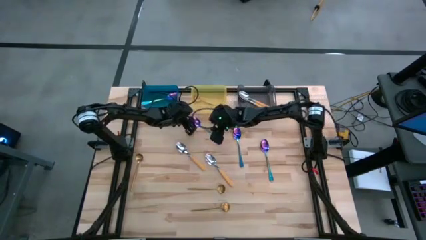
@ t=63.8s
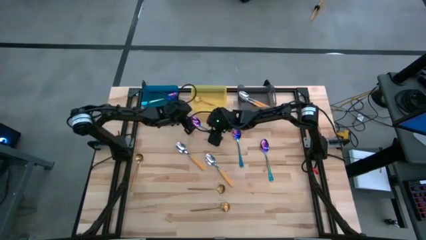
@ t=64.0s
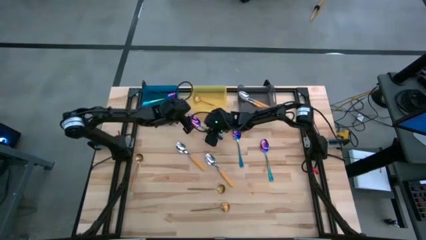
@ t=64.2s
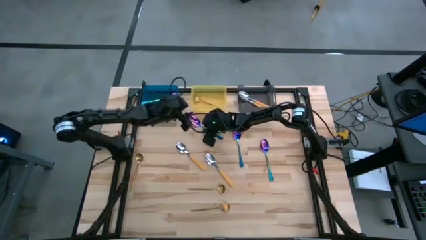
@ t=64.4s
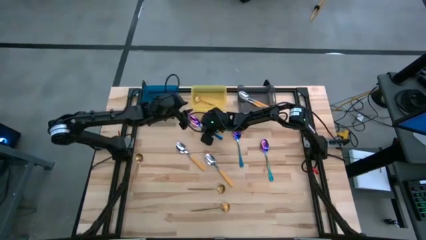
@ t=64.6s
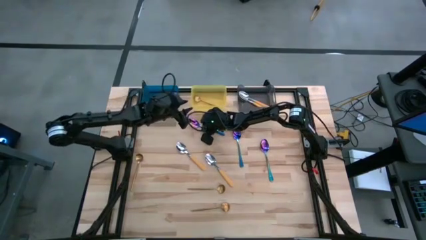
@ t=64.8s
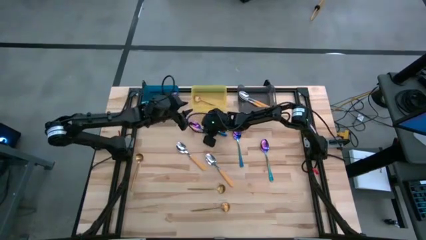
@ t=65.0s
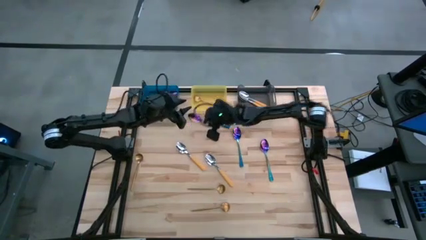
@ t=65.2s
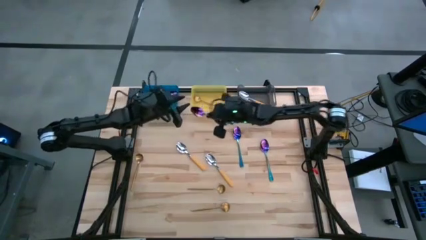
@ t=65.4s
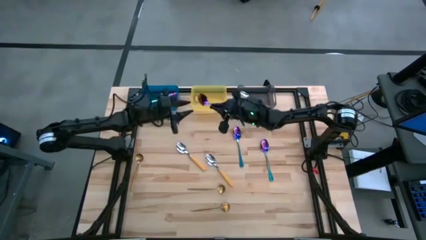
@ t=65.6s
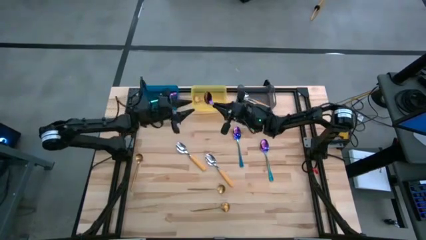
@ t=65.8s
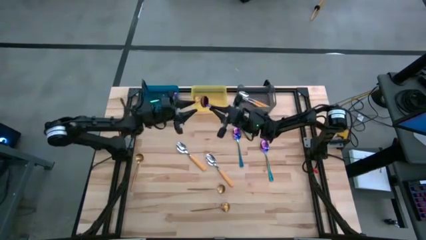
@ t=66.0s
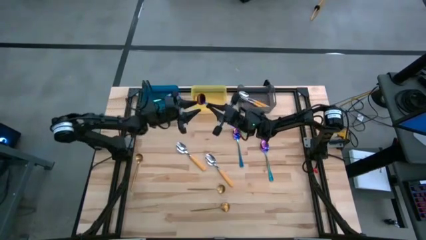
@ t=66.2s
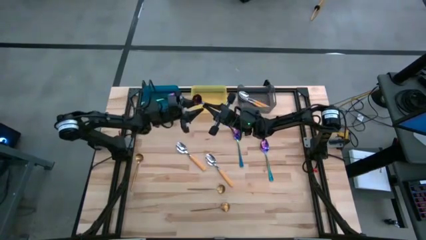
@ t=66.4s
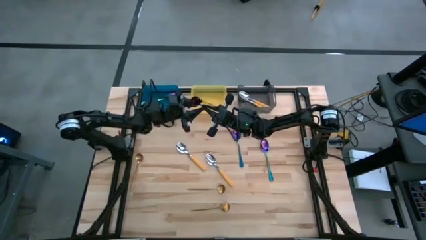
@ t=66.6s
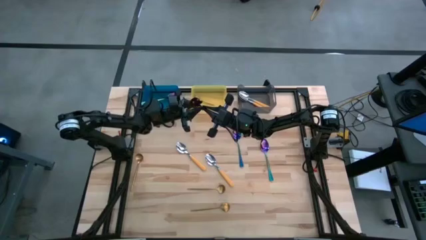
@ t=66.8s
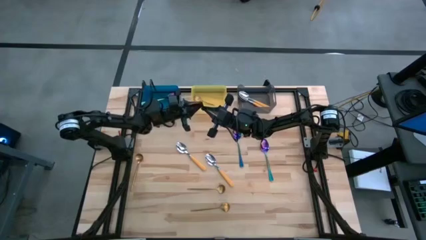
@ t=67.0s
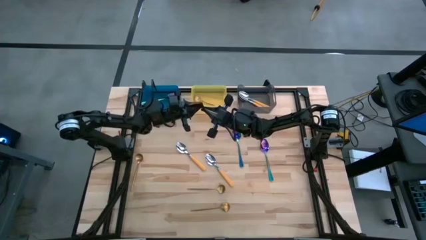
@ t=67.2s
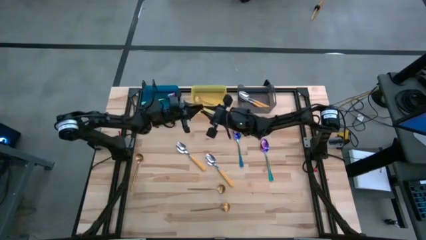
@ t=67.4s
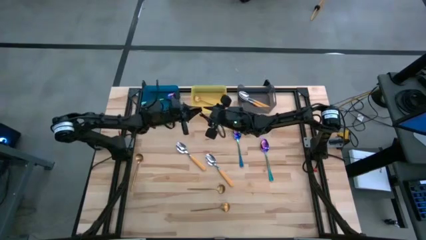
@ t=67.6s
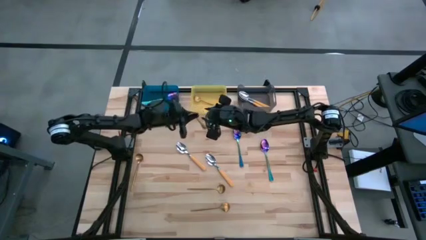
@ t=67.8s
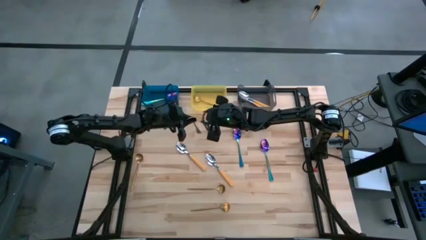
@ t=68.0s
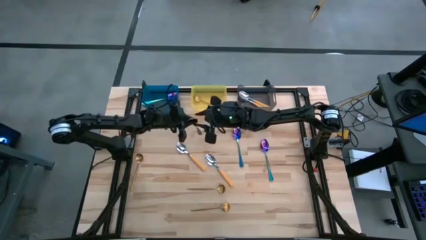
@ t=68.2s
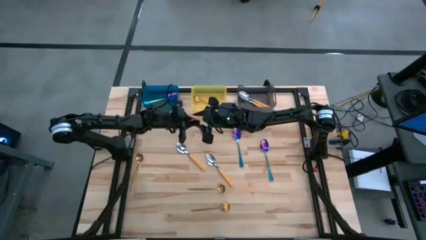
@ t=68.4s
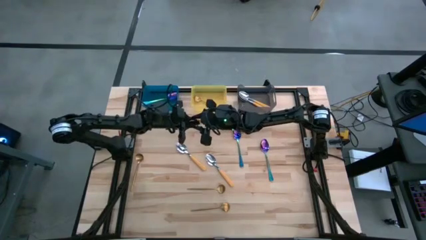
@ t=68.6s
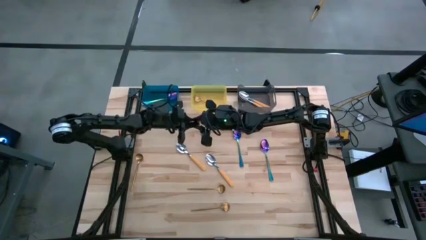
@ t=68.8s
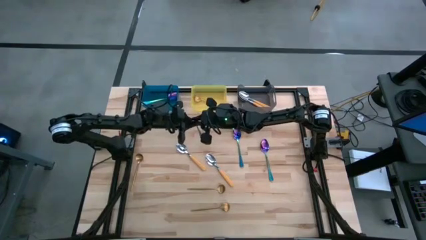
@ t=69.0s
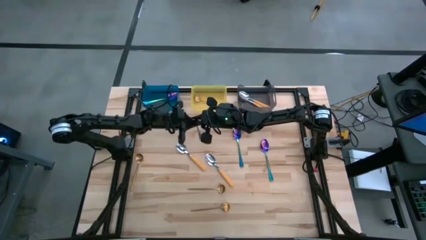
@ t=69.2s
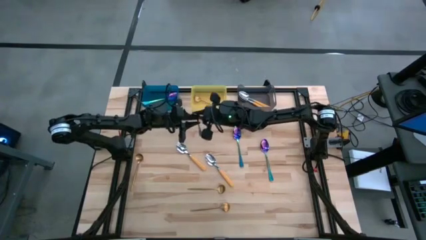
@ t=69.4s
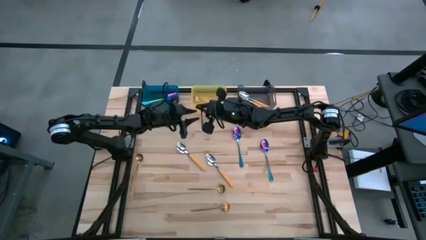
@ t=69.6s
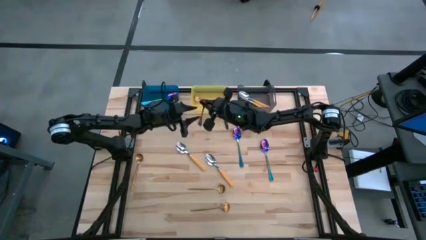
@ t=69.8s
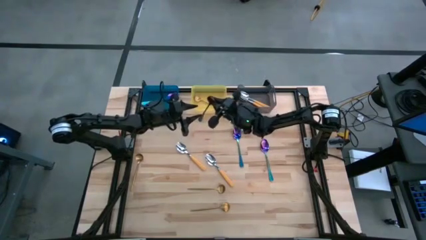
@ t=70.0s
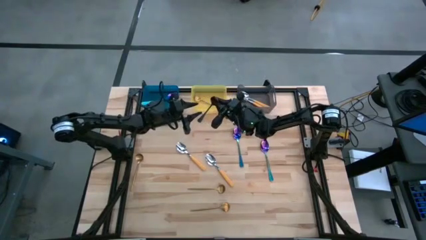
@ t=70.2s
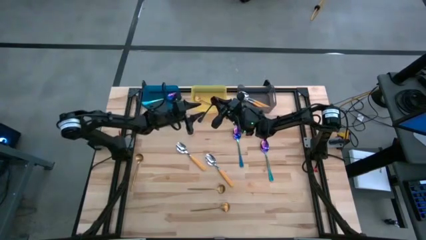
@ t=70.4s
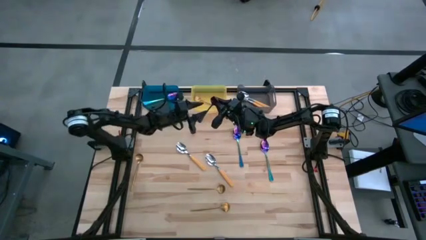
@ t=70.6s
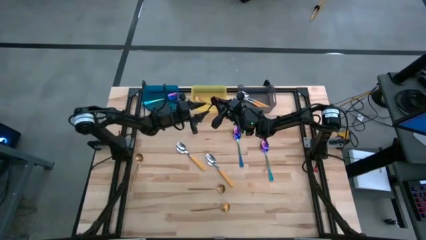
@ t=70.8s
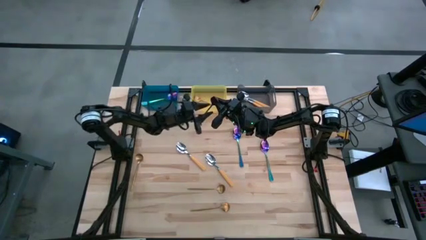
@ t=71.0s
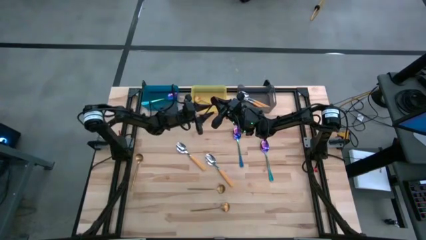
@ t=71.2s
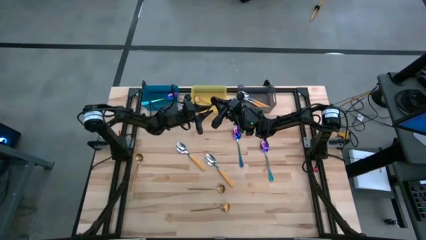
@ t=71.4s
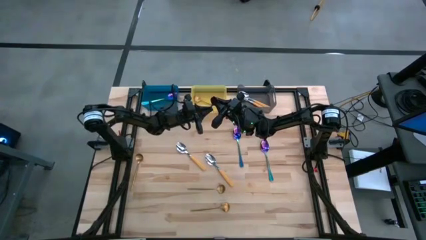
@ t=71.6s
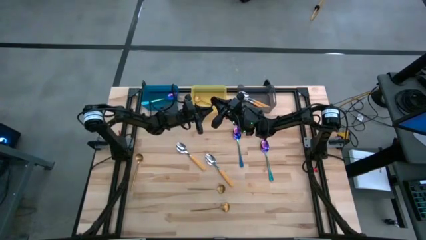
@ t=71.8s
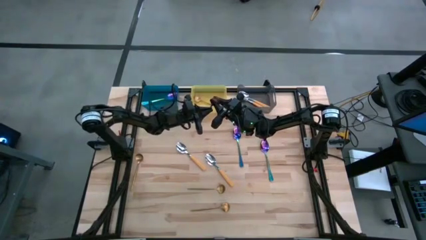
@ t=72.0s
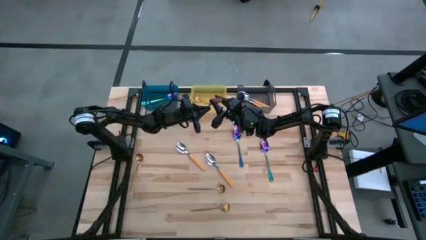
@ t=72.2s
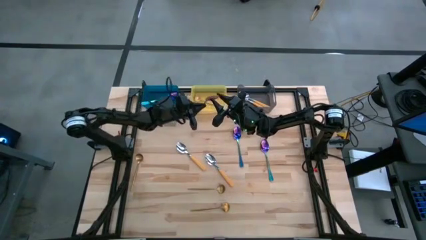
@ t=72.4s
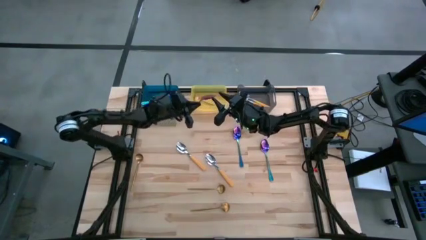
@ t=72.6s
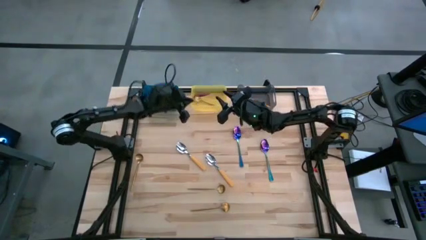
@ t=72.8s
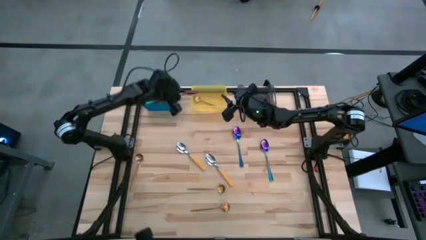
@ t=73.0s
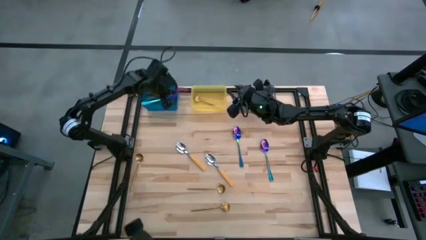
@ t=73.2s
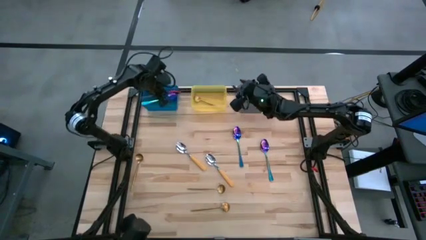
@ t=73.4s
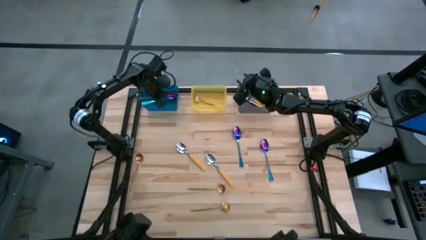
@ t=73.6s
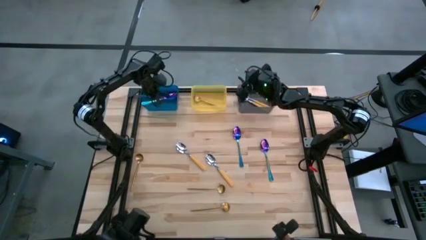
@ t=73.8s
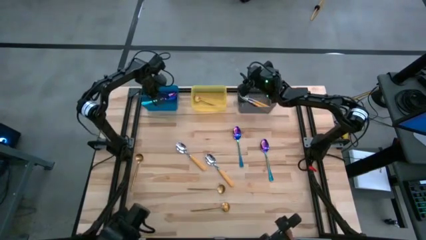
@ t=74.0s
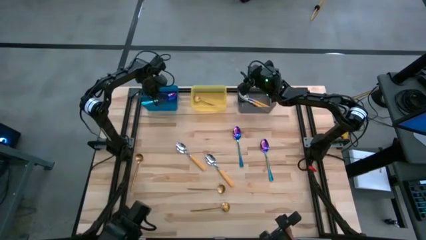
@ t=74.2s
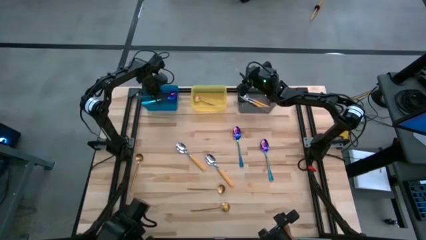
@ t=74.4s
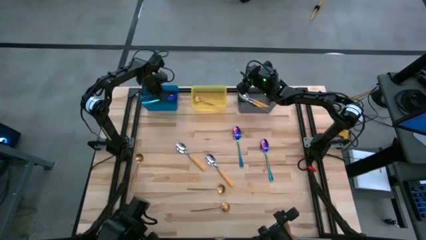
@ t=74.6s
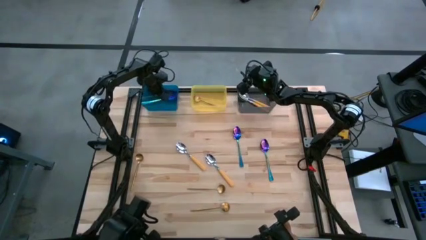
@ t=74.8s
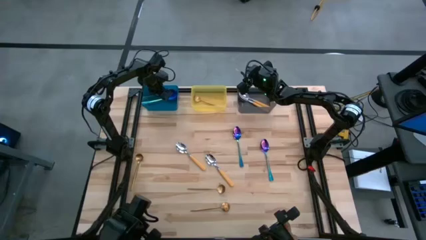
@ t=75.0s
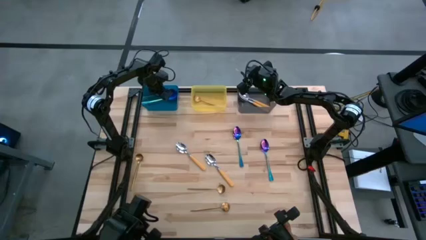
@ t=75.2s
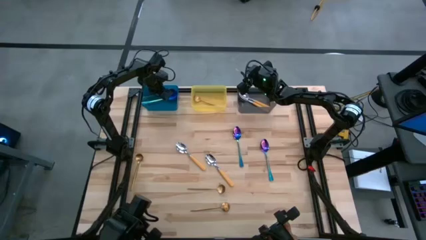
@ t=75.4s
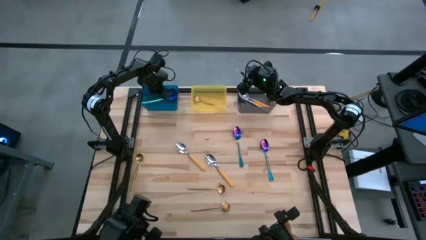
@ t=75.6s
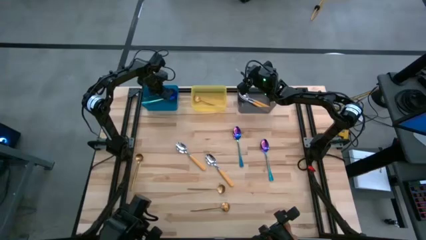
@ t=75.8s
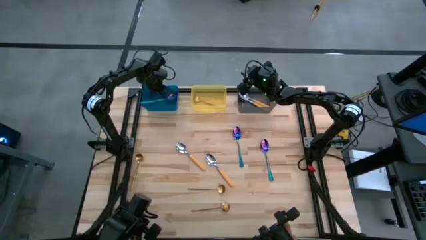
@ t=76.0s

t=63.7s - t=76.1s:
Task: Sort silverware by color (type)
Put the blue spoon into the blue bin

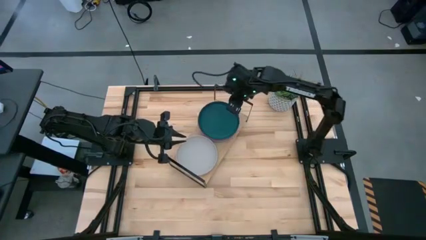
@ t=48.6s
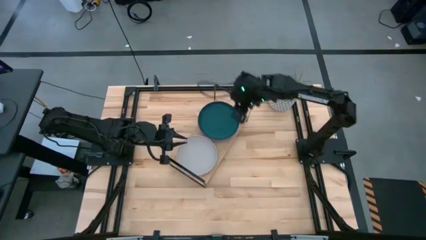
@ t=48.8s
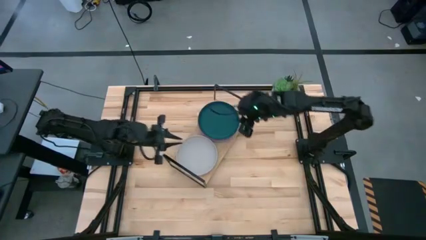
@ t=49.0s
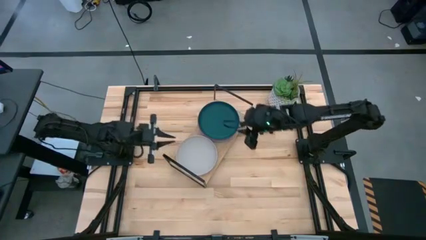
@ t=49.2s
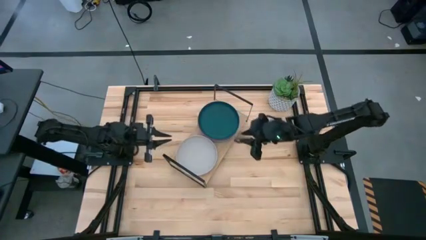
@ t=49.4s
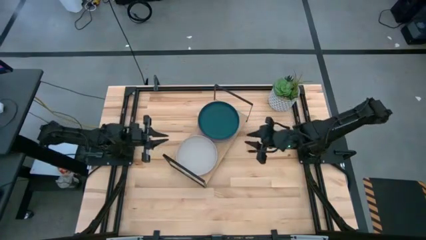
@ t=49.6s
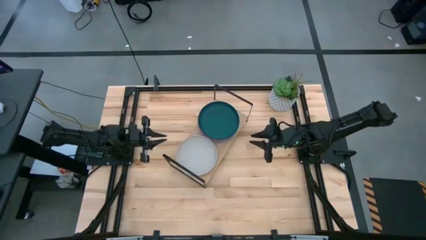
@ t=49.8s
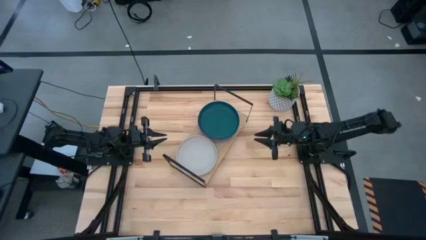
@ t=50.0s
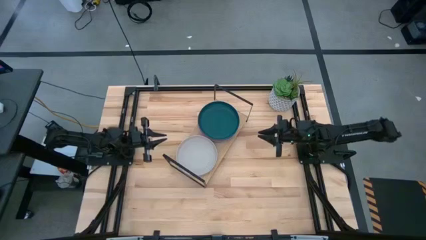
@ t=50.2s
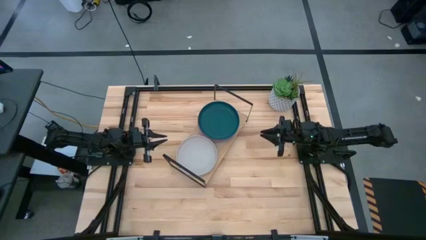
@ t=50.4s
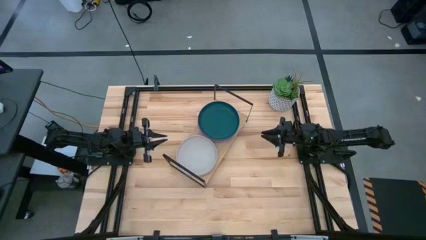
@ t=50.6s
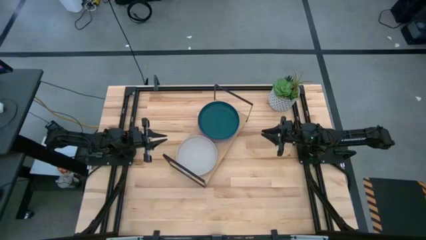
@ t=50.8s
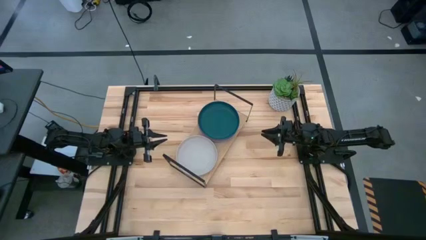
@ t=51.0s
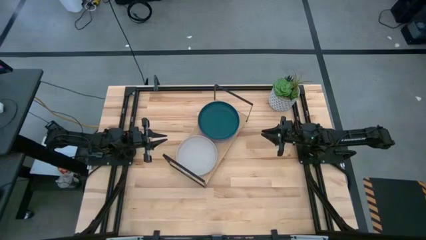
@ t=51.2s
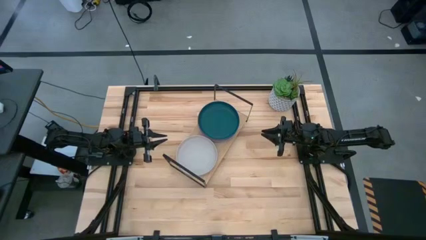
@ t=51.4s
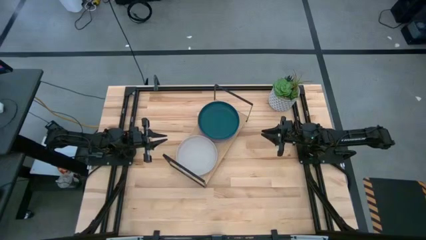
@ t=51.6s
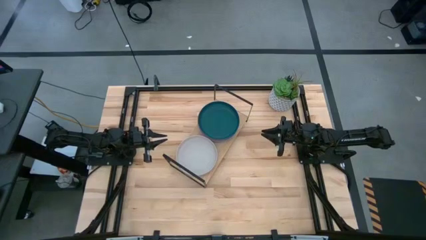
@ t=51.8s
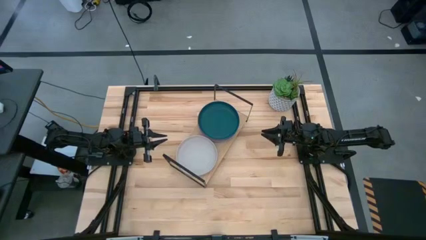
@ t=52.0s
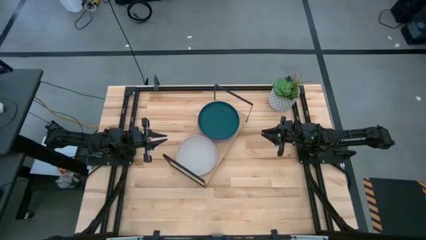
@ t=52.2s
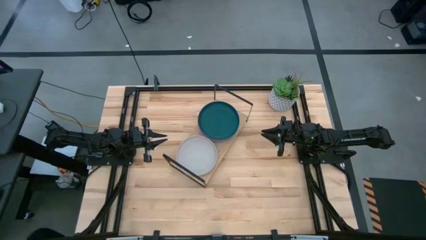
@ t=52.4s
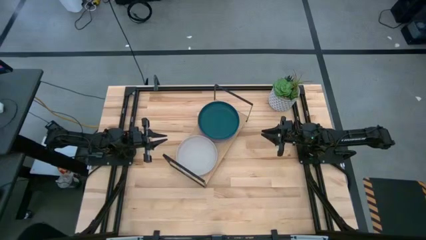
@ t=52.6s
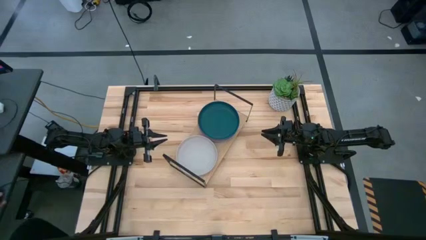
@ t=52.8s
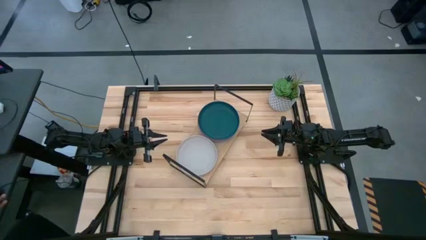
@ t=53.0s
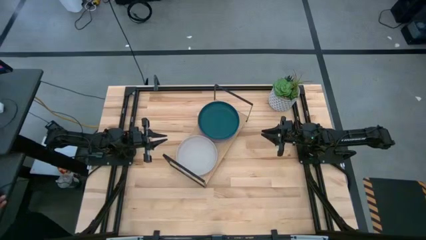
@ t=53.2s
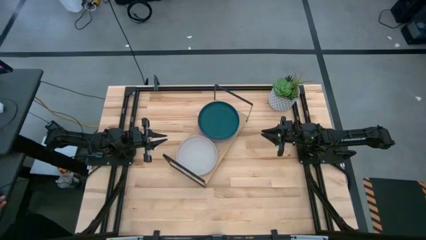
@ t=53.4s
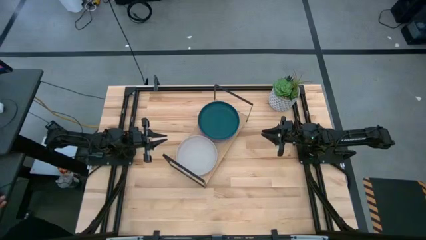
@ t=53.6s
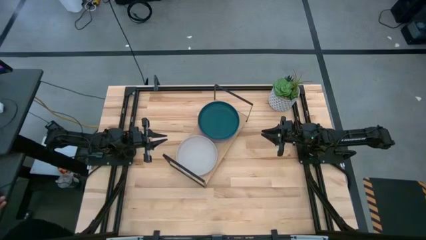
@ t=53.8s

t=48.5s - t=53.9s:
Task: Place and stack plates onto a shelf
Return to Home Position
